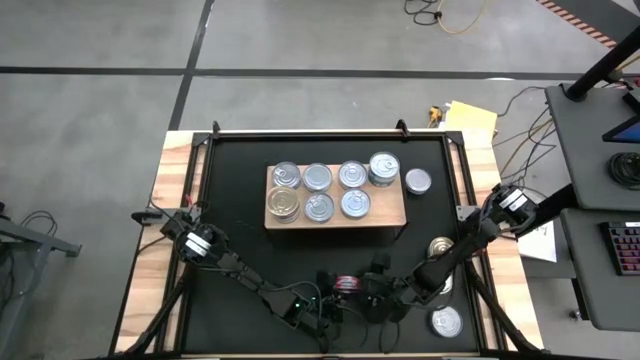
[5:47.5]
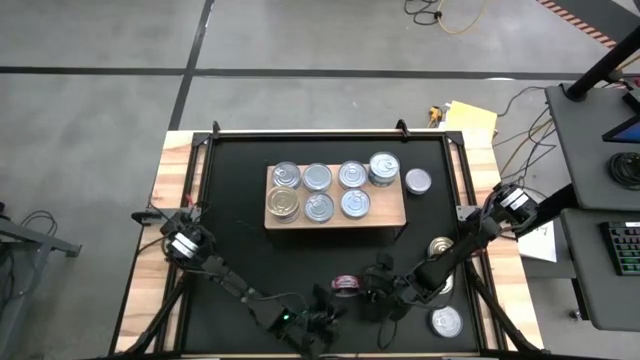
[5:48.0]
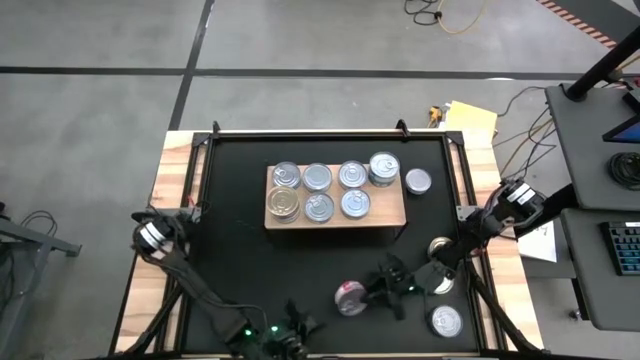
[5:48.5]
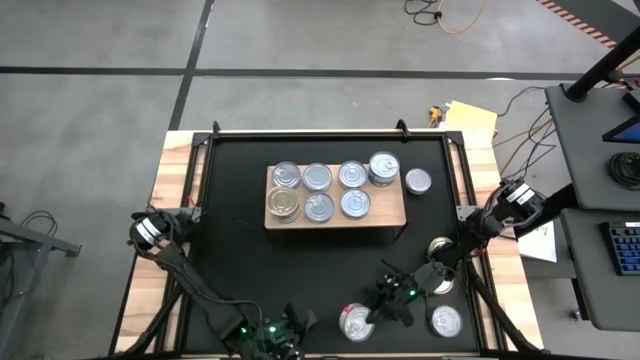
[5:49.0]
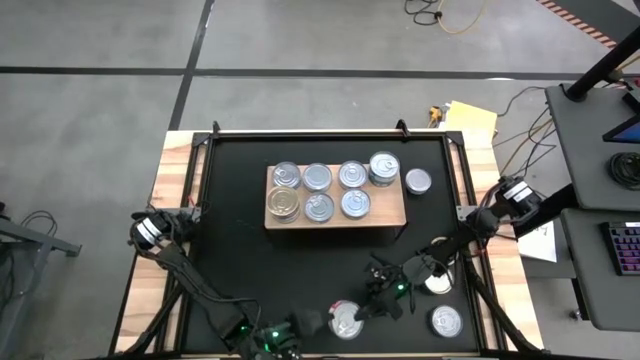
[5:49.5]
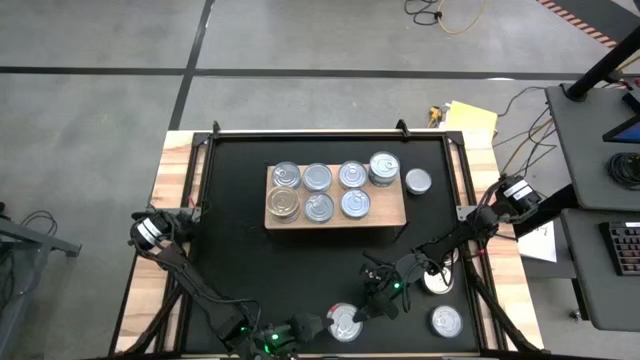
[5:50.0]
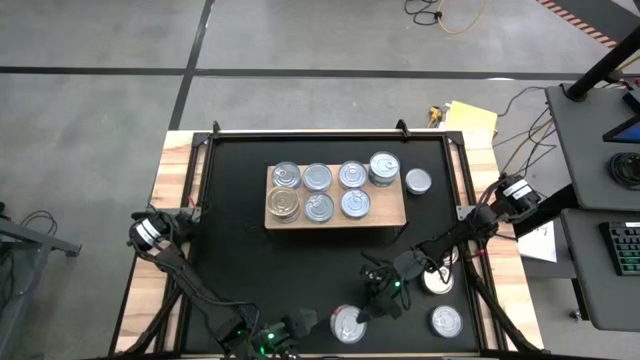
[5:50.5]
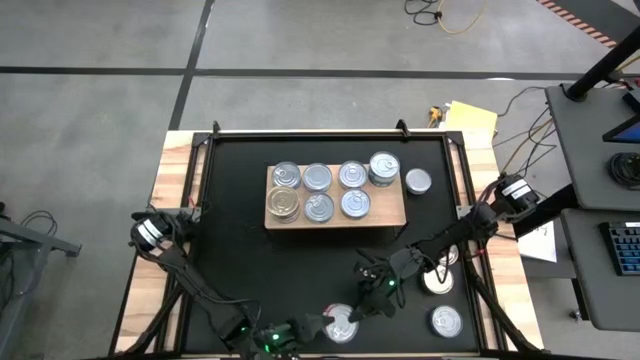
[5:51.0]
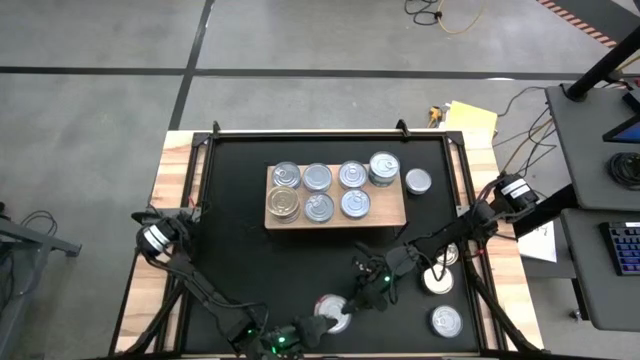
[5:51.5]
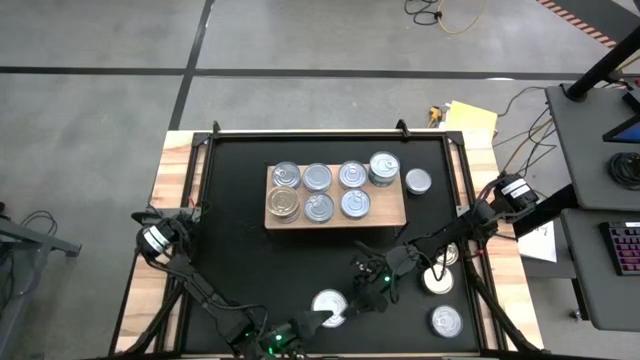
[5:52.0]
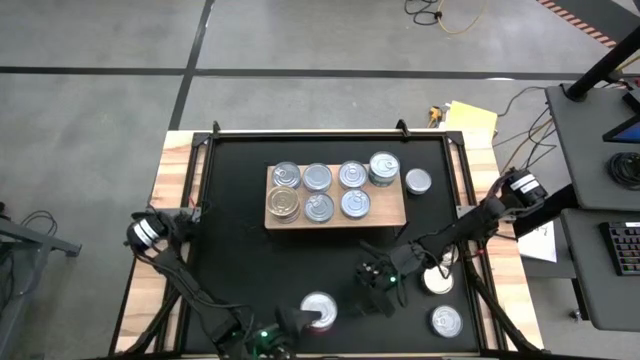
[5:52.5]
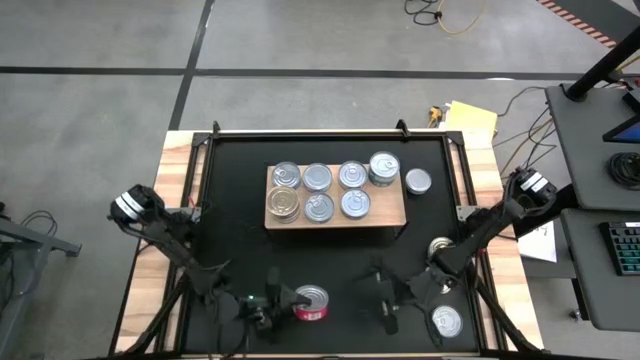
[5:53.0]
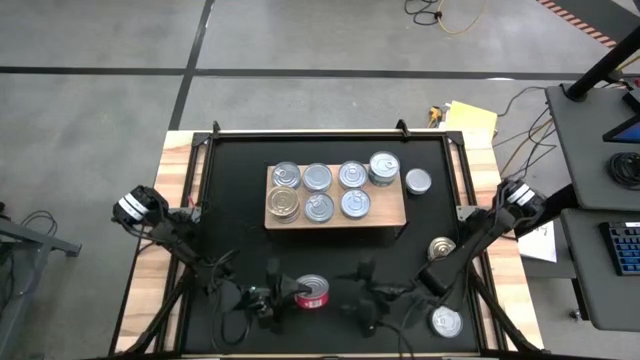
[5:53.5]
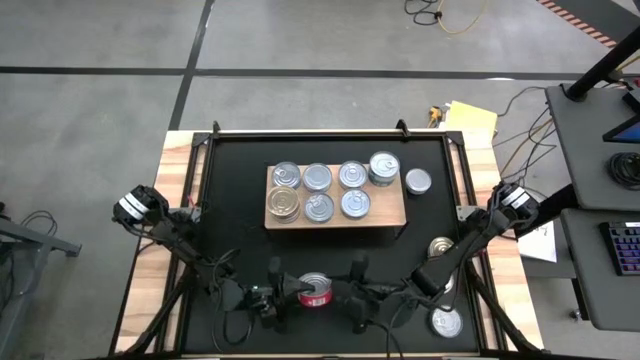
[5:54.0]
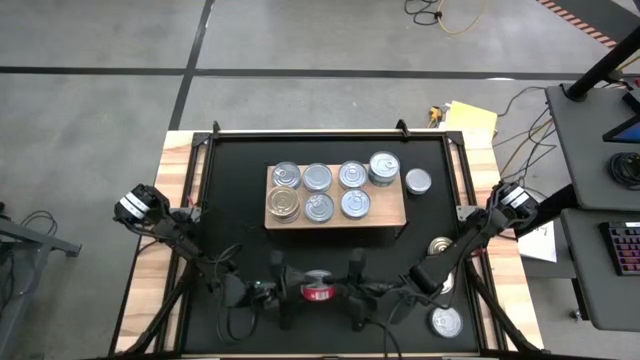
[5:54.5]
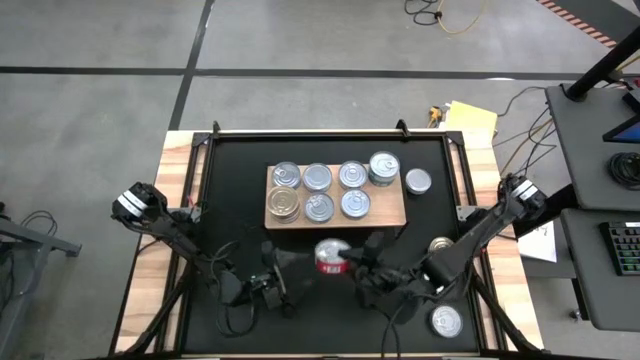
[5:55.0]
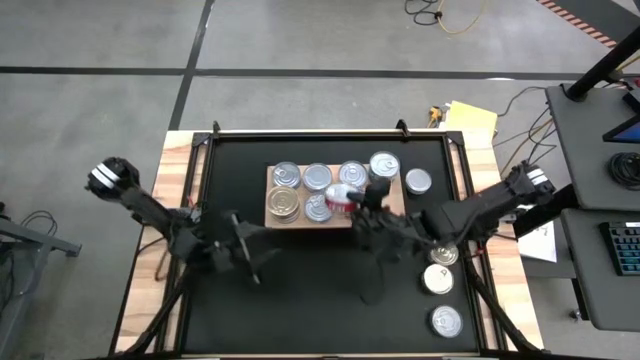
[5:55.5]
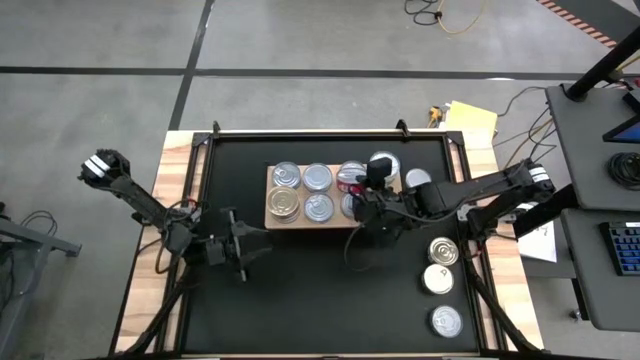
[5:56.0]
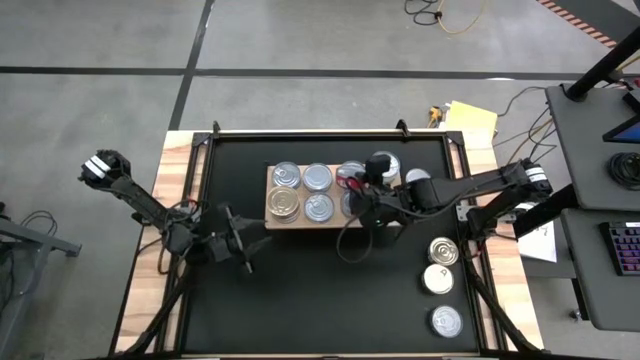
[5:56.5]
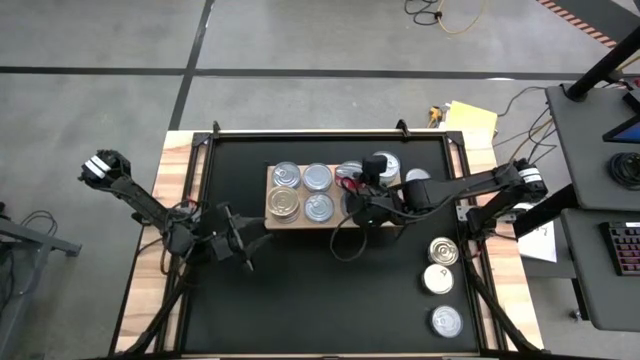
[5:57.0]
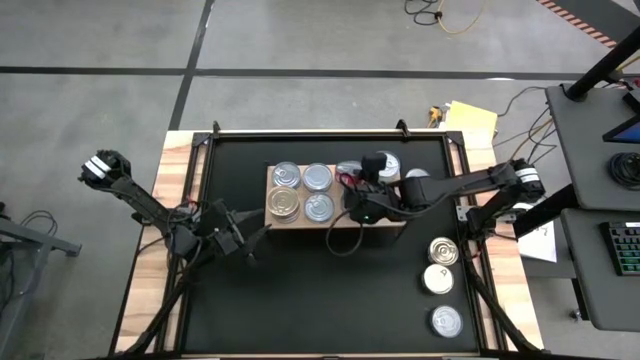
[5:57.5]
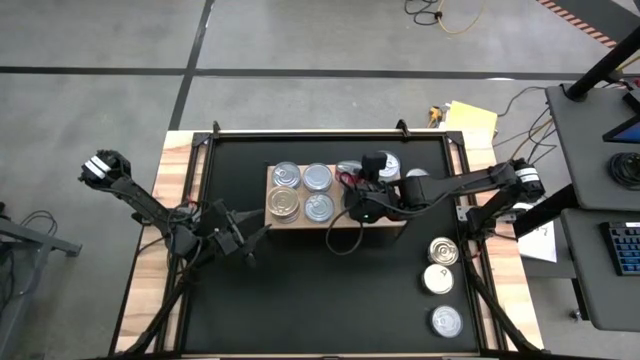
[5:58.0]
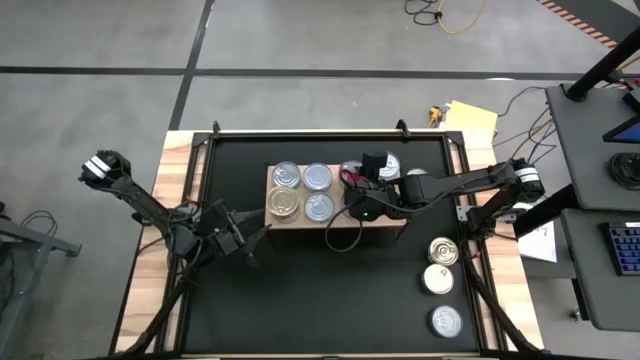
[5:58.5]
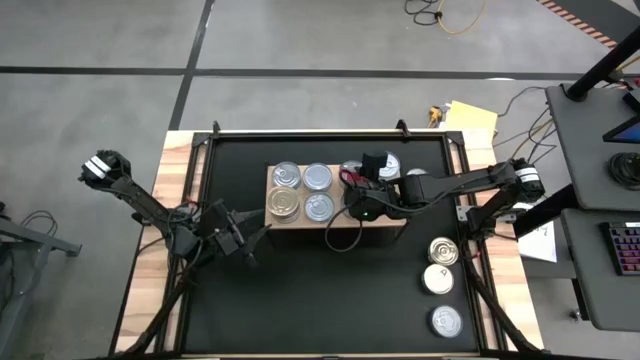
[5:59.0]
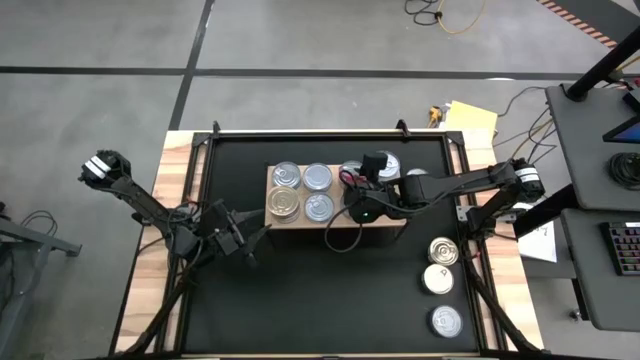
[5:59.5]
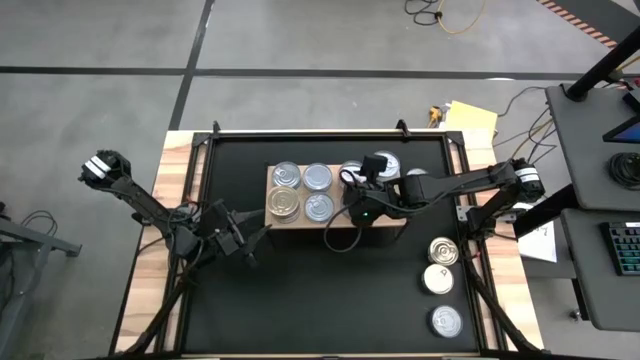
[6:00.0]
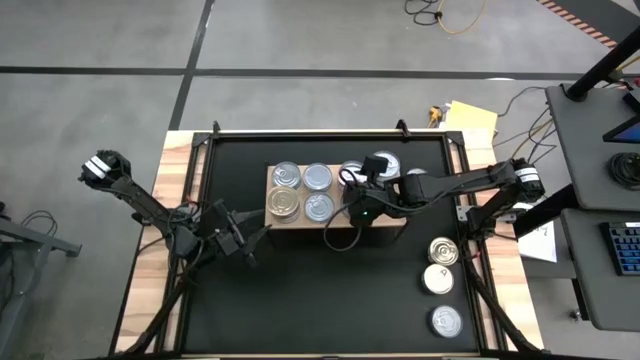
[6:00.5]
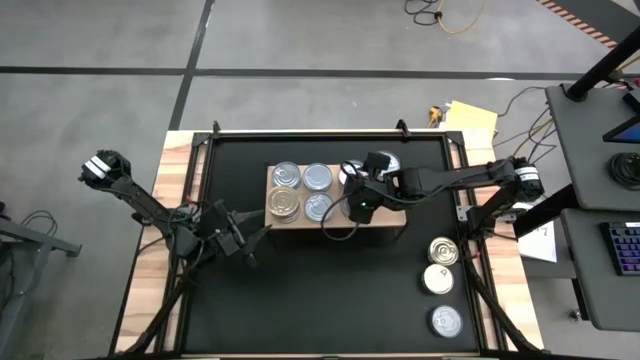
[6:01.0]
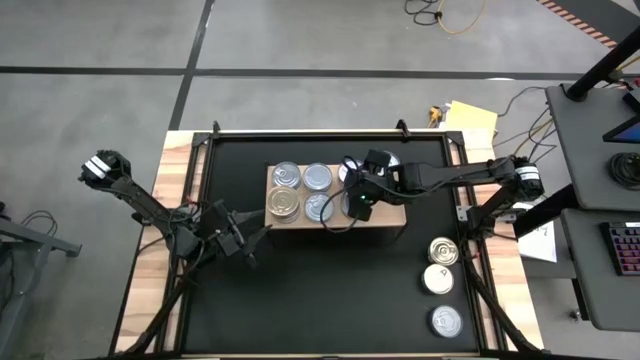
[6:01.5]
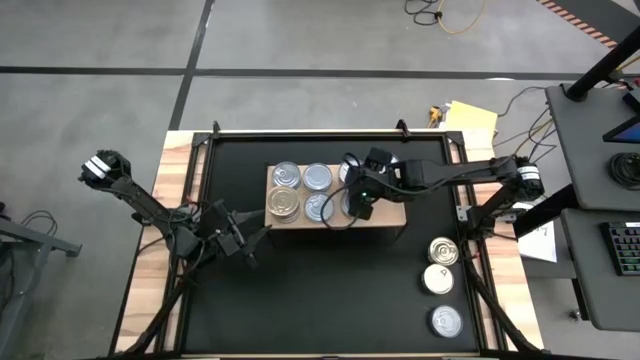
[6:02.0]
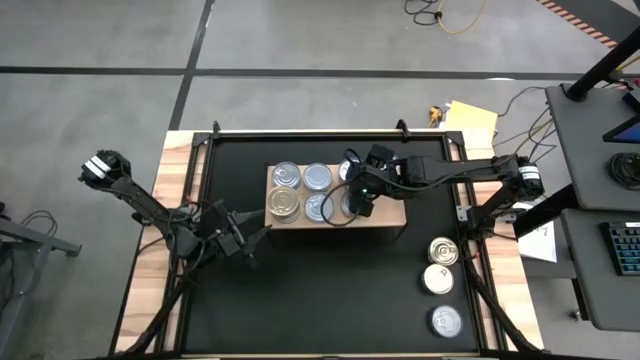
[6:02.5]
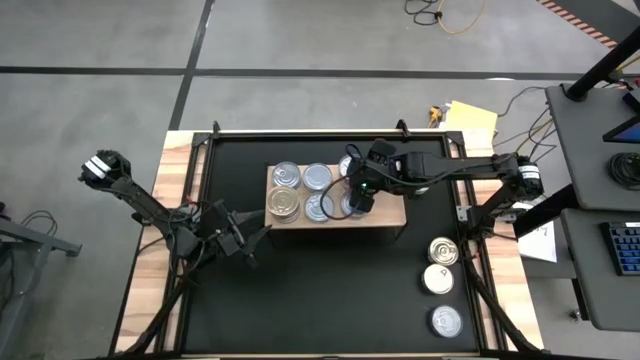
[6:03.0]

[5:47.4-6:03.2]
Task: Stack canned seafood by type on shelf
Stack the red tuna can on the red tuna can

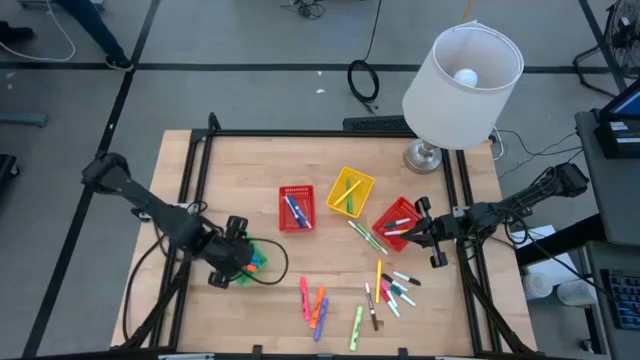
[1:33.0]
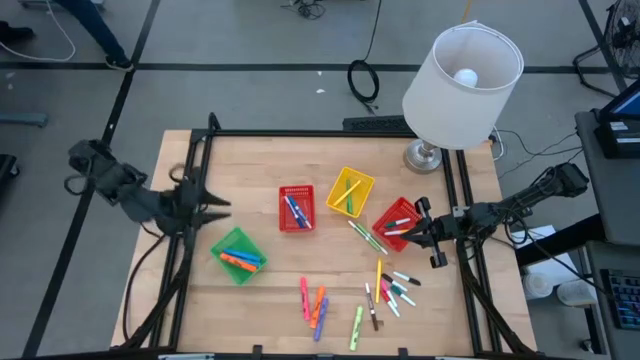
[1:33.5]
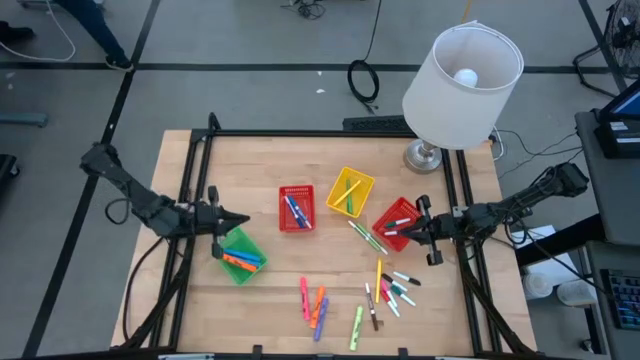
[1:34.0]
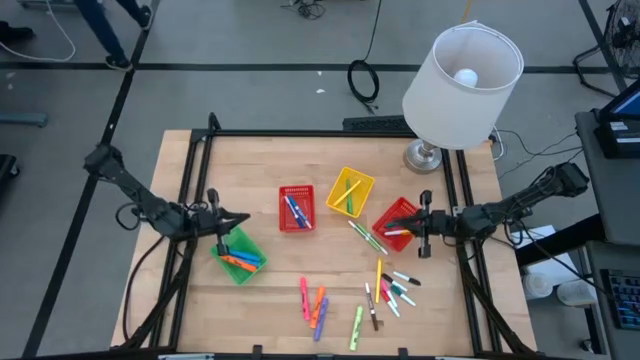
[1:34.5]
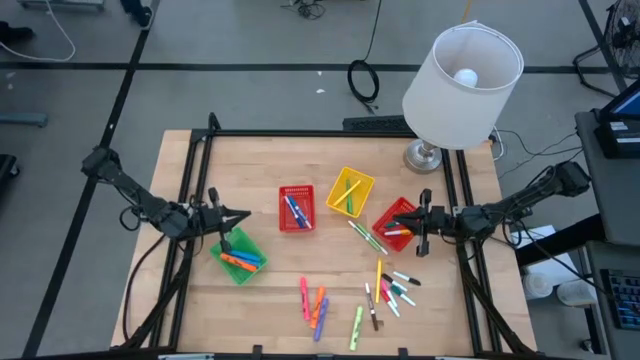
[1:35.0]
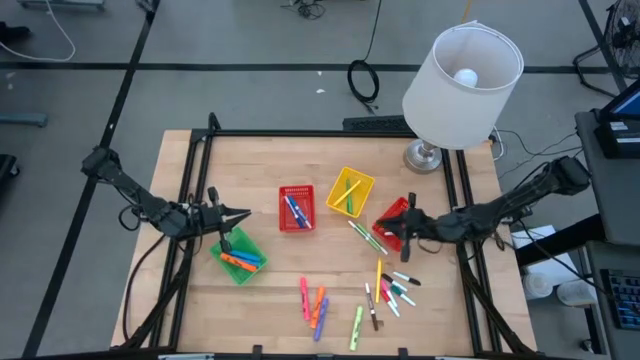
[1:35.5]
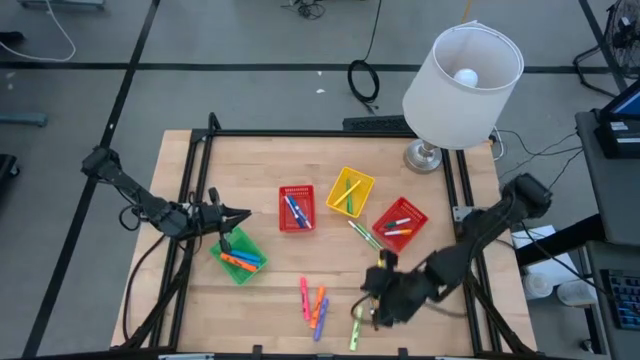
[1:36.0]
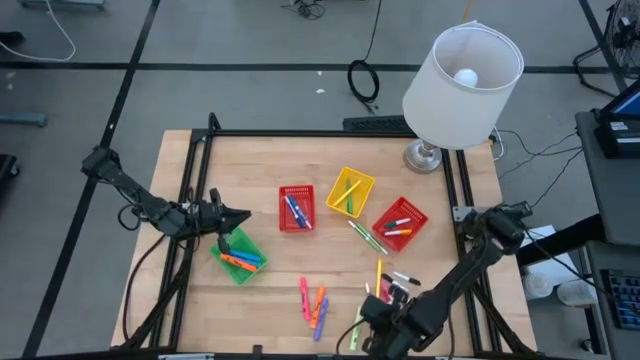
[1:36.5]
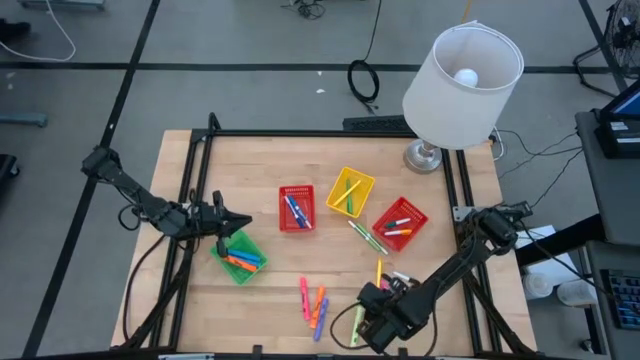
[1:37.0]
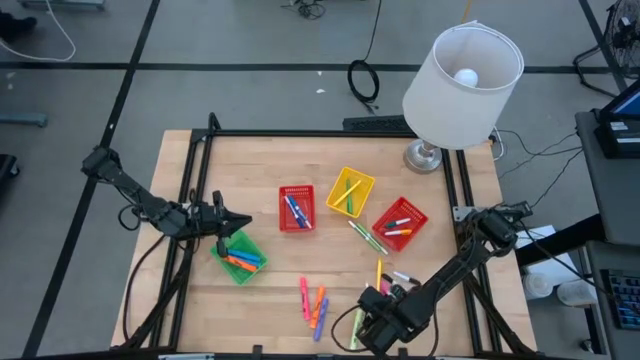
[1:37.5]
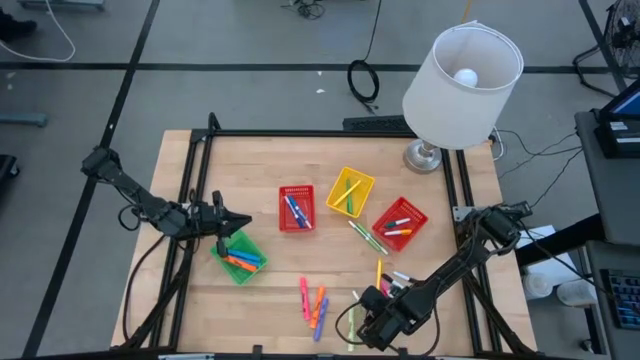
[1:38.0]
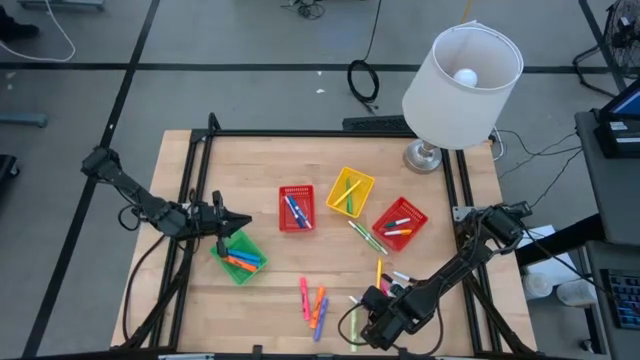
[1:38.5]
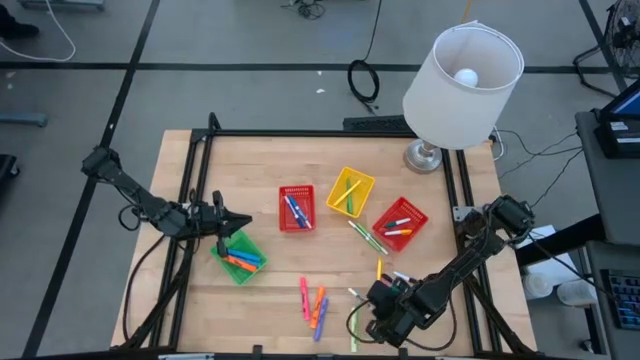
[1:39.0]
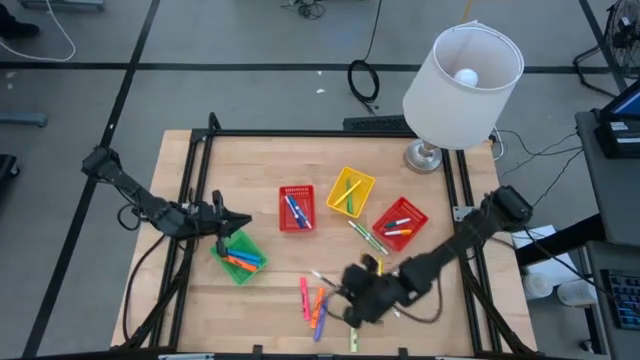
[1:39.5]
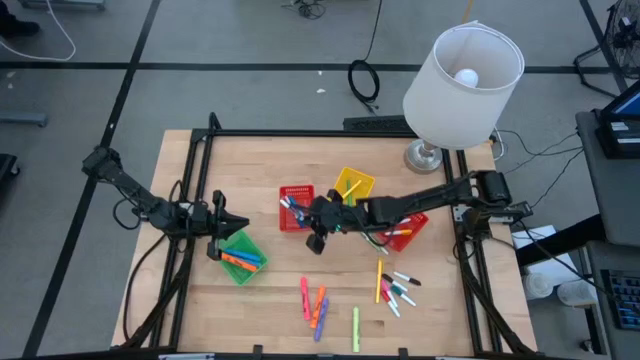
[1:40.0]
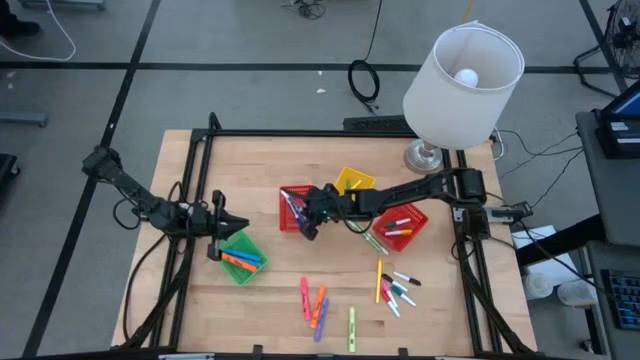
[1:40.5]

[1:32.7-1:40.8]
Task: Pick & Place Markers
Put the brown marker pen into the left red bin
